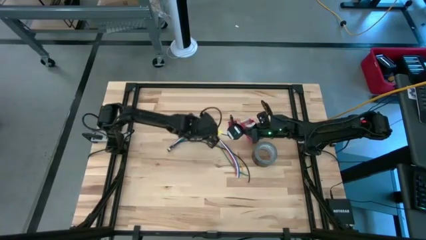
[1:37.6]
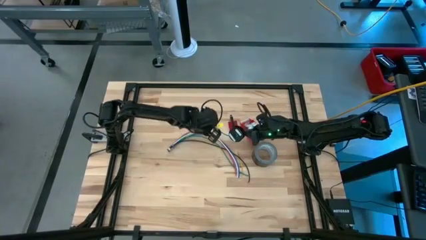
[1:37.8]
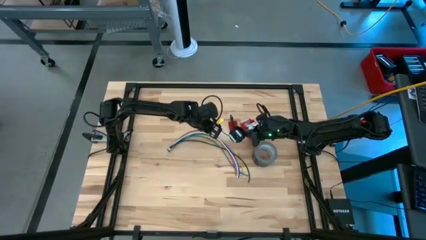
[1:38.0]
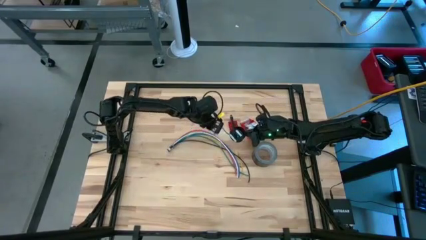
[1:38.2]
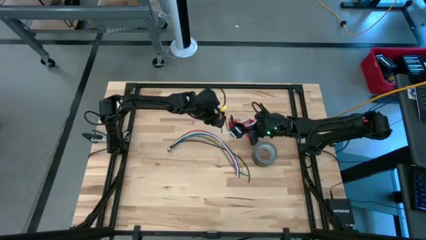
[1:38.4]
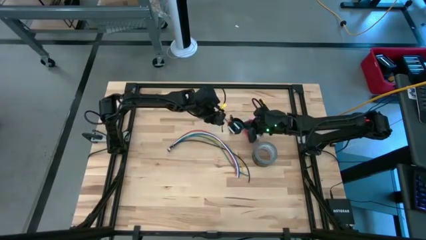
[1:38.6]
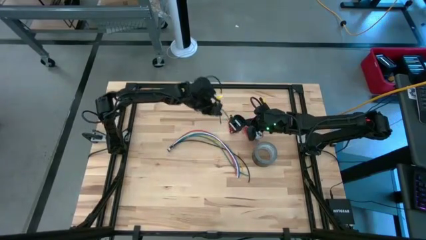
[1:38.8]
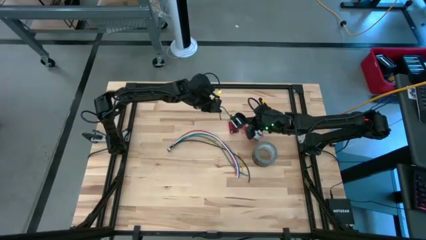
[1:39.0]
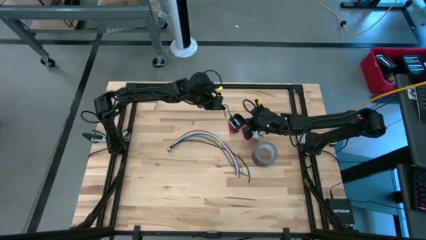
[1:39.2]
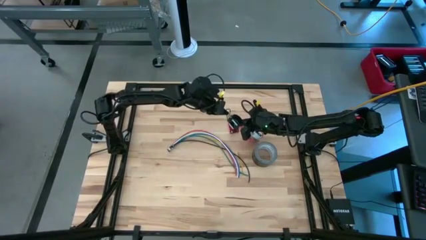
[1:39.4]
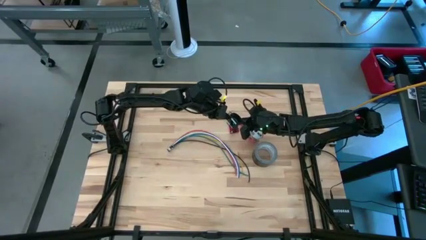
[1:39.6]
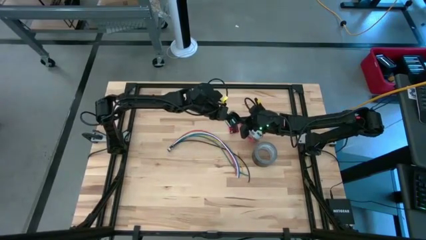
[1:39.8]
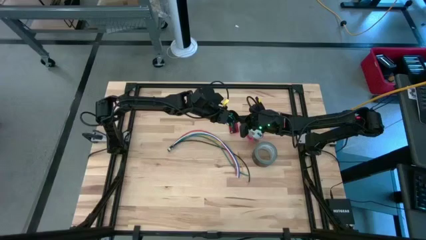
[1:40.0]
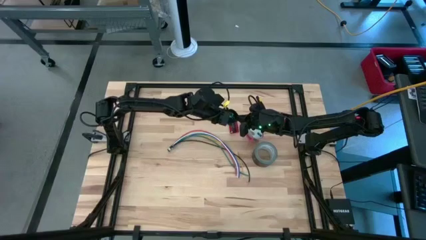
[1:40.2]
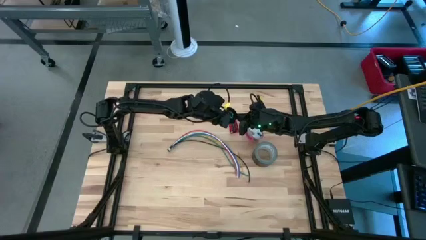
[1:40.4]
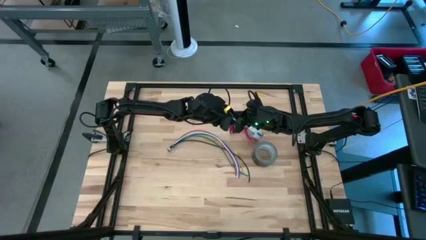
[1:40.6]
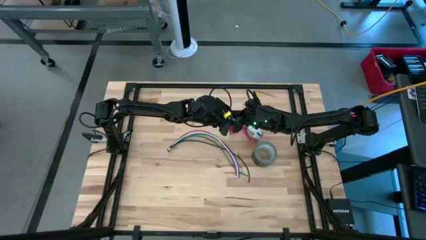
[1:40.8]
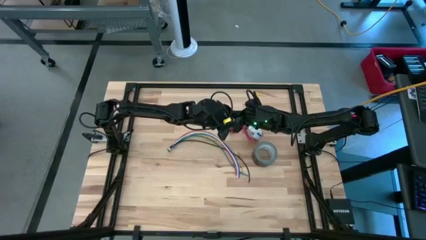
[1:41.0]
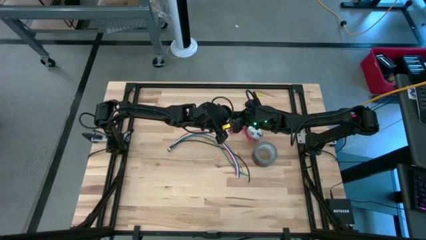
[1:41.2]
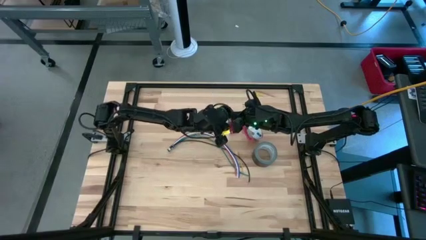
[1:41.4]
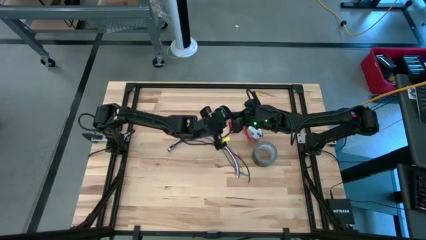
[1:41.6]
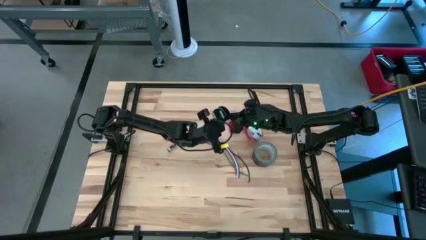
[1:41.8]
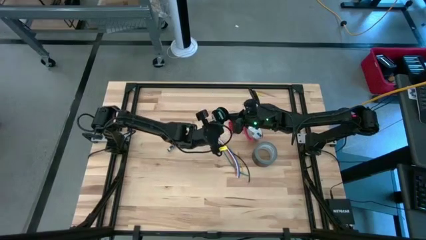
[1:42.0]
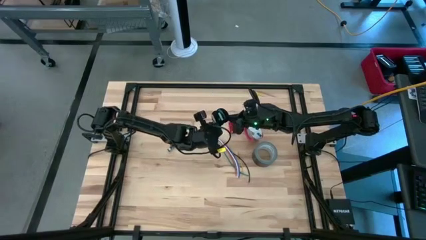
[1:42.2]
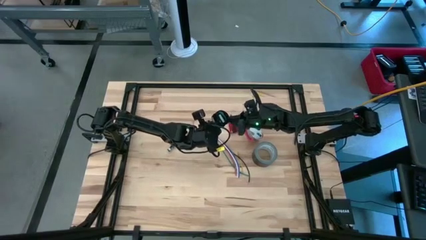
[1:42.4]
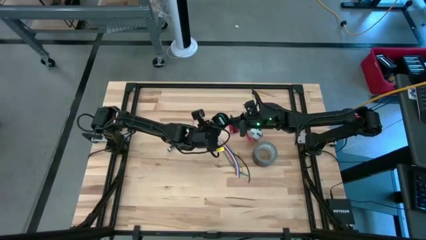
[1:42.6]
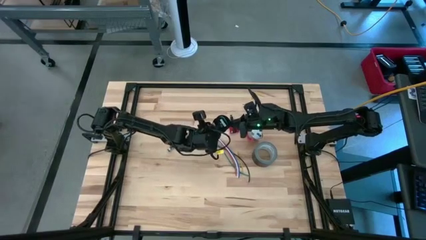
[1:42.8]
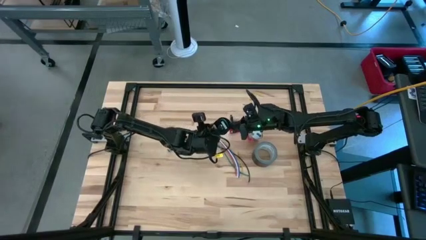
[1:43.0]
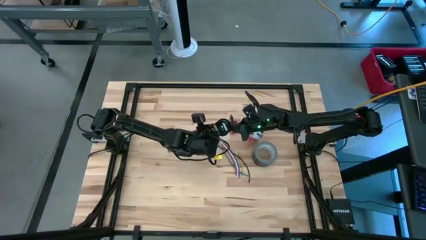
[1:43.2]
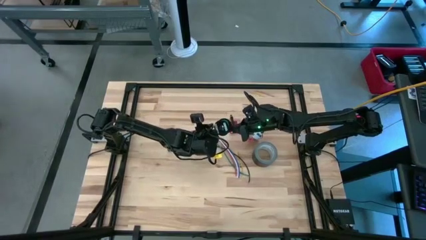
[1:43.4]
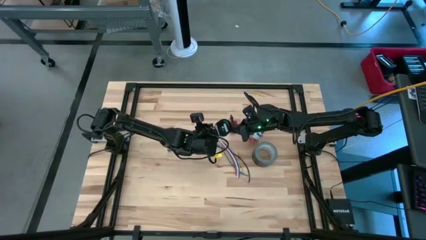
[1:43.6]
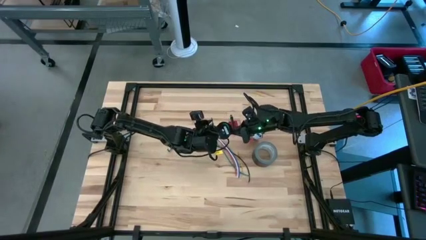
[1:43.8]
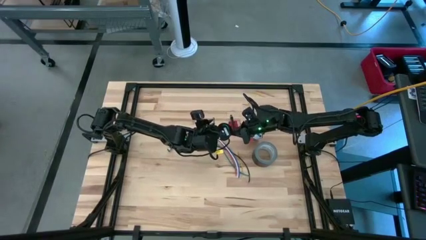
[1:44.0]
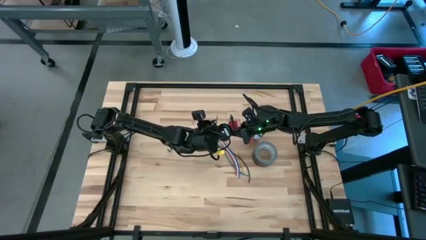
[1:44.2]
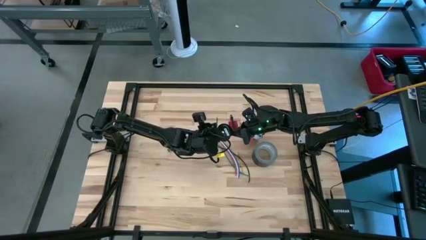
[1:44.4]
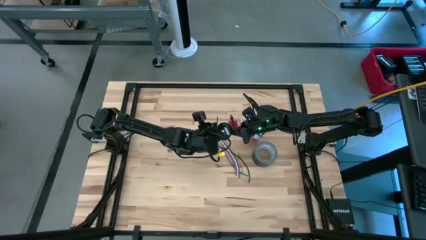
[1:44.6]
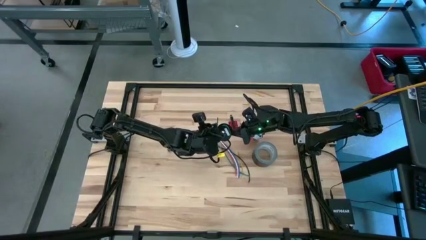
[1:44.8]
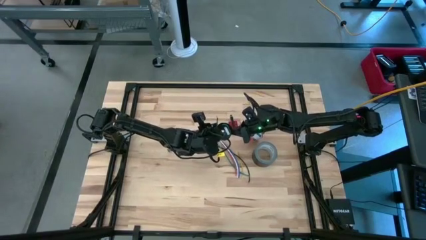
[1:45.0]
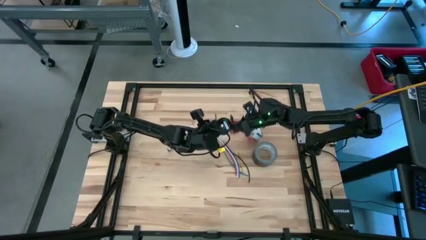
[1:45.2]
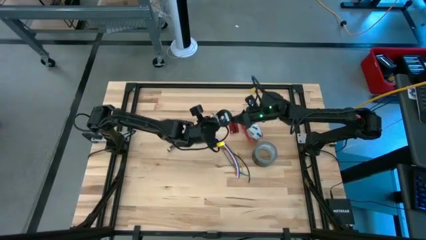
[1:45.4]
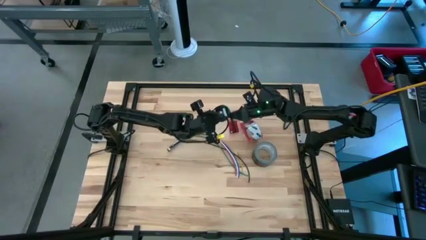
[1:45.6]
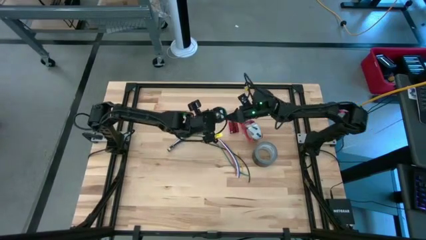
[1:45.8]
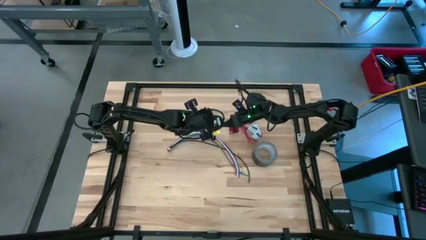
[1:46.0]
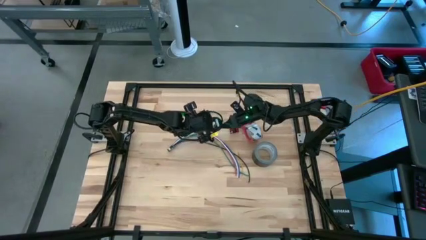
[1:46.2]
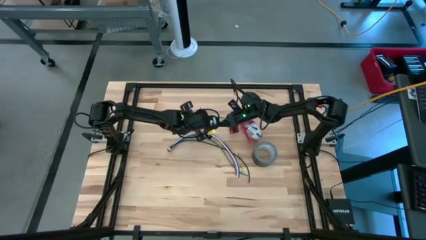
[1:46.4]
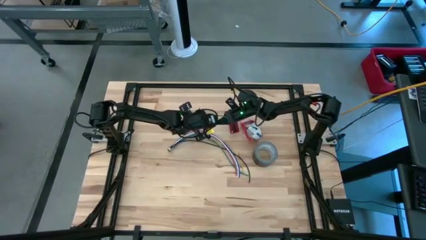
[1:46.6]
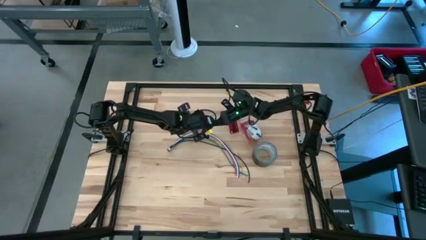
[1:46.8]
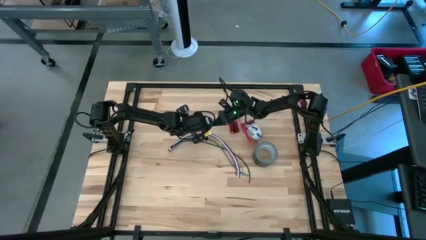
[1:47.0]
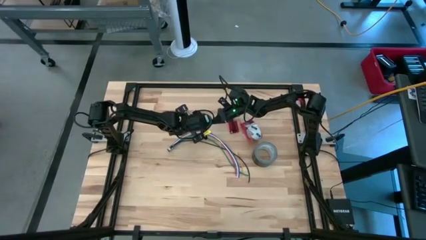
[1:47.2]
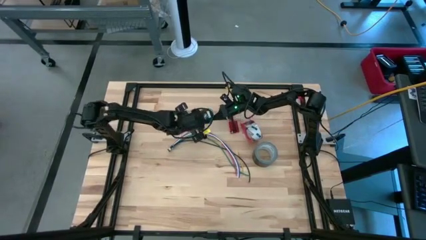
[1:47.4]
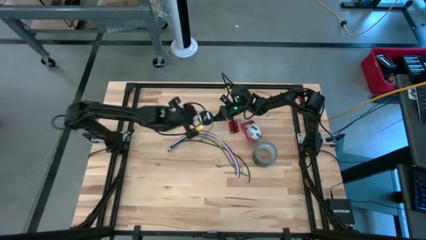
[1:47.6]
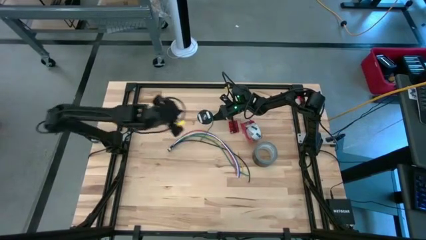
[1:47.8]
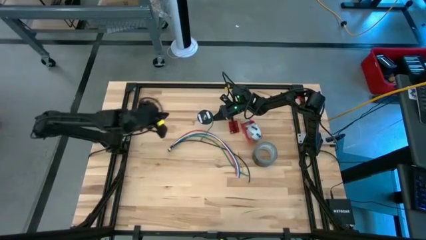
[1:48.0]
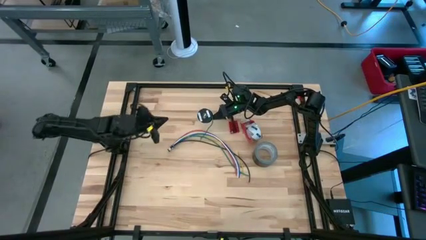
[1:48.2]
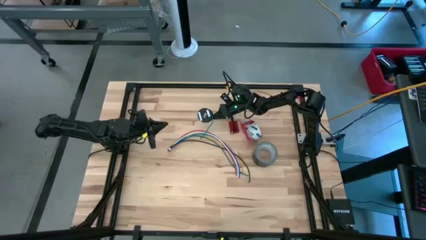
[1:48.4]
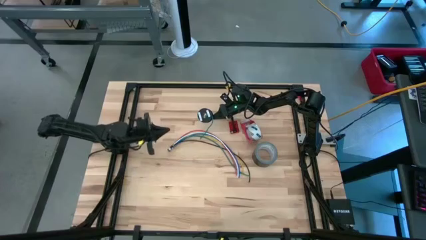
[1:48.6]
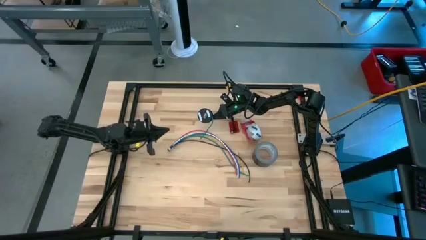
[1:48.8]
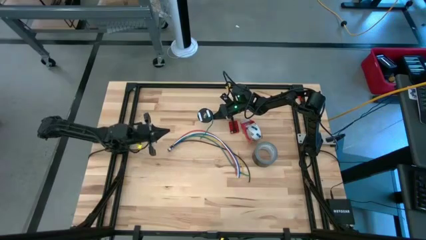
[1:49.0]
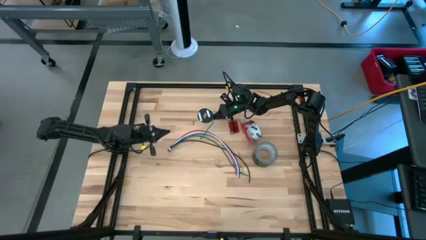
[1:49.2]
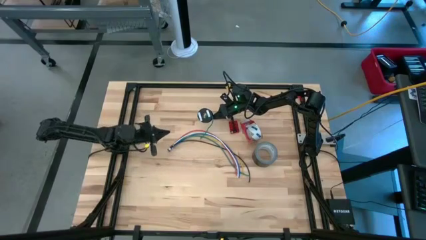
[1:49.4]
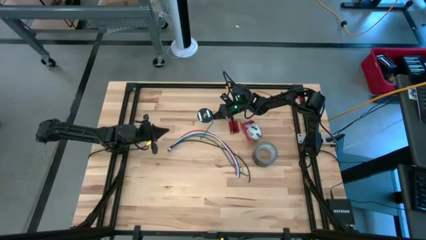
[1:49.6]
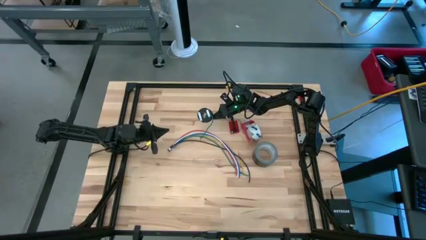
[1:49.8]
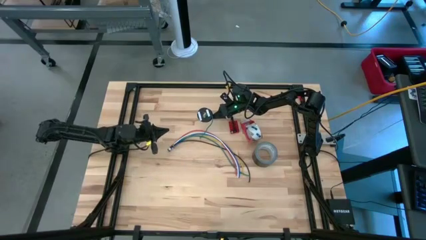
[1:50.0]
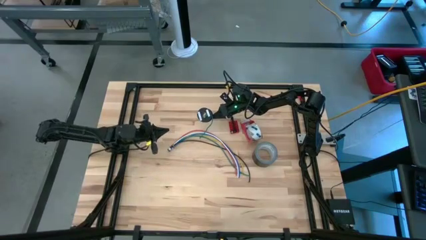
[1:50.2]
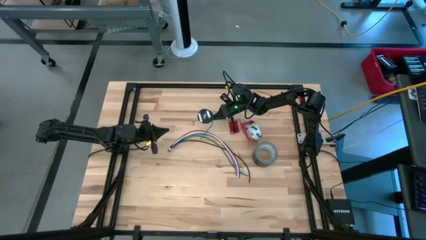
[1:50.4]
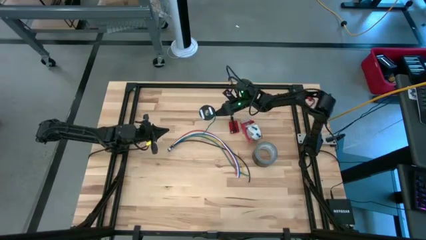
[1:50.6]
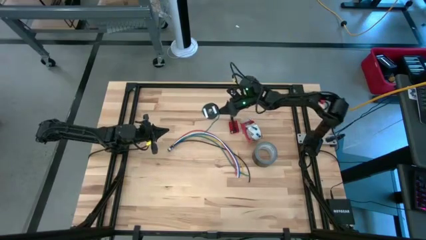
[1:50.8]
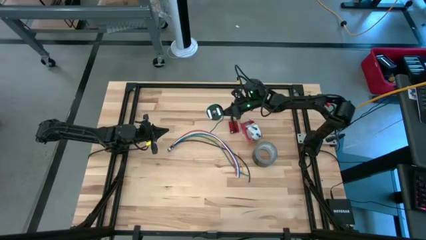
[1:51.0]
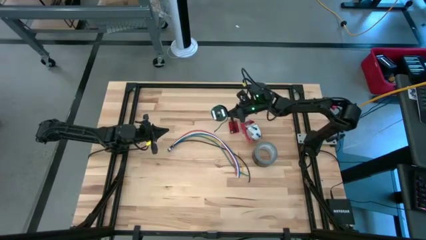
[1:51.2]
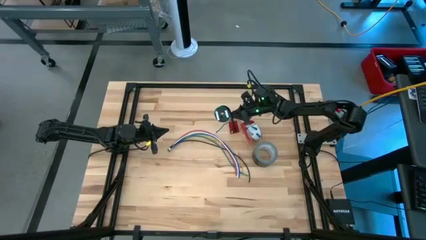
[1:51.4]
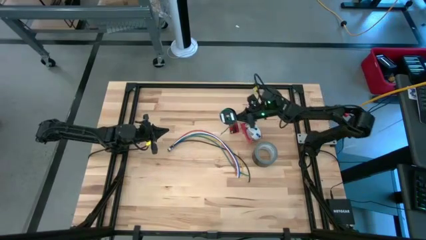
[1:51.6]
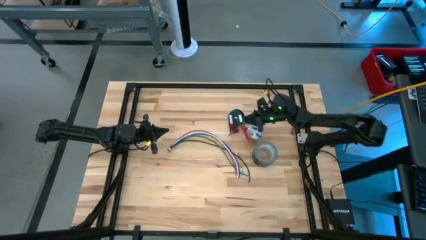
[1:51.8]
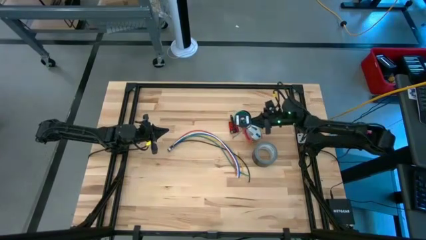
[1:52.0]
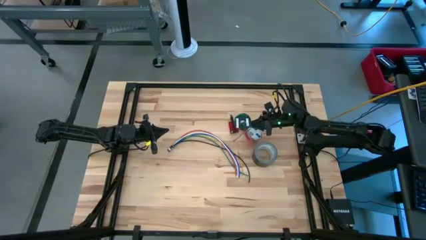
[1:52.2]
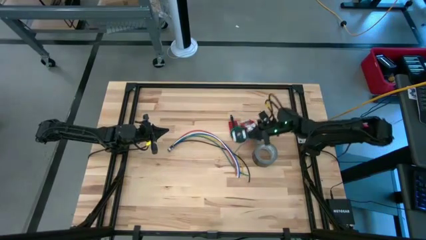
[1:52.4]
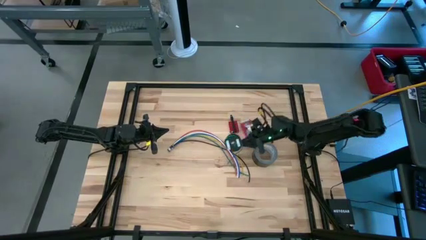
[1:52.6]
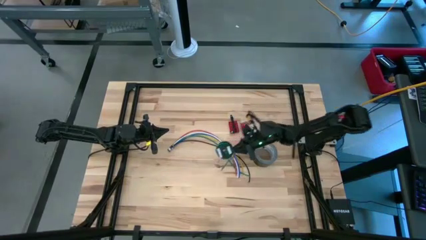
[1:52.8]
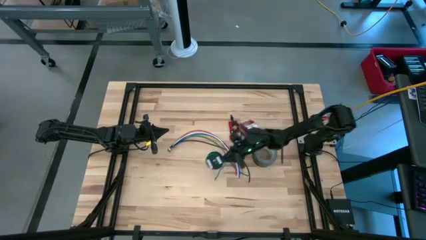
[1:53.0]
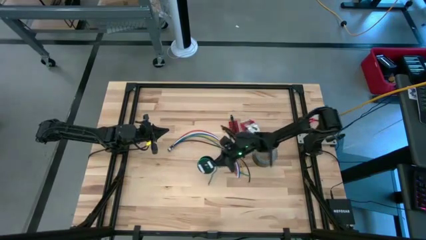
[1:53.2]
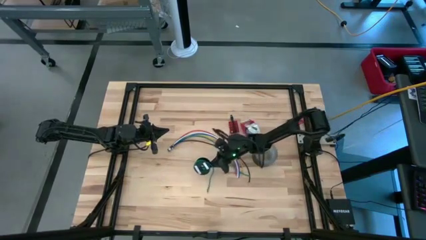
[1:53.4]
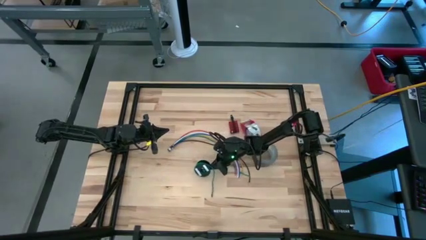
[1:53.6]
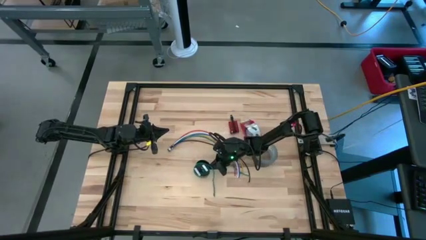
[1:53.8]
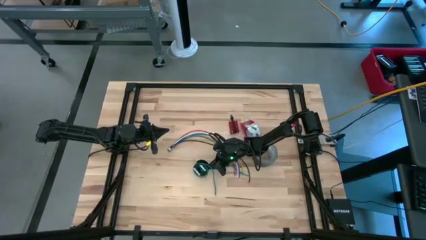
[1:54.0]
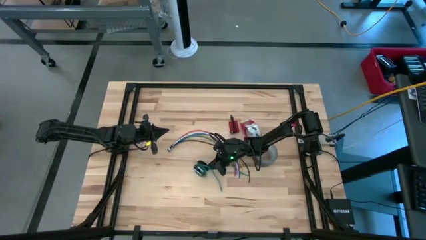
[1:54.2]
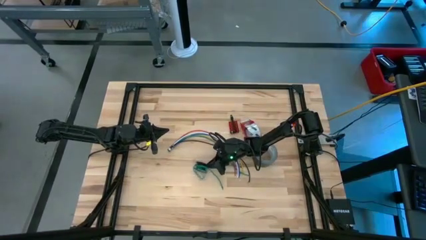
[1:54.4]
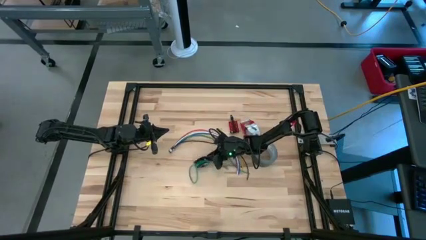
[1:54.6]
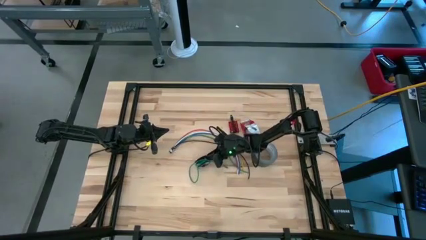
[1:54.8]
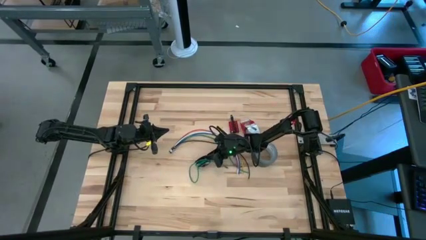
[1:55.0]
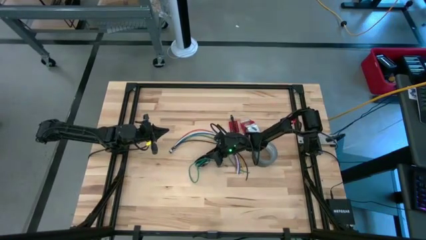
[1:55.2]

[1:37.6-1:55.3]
Task: Coil cords
Coil green wire onto the spool
